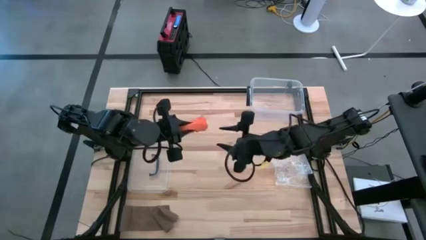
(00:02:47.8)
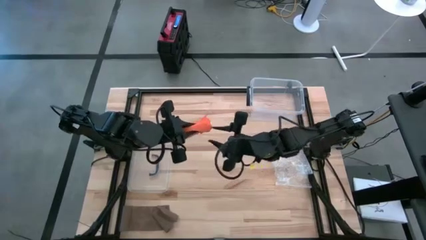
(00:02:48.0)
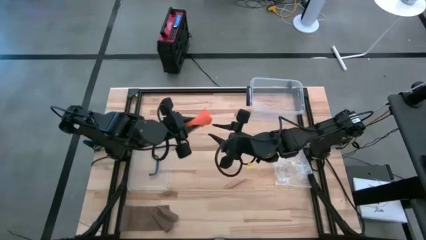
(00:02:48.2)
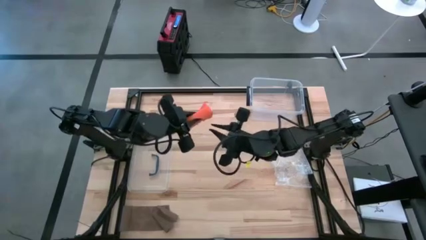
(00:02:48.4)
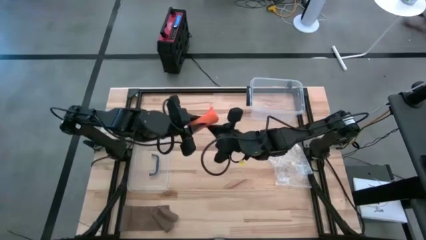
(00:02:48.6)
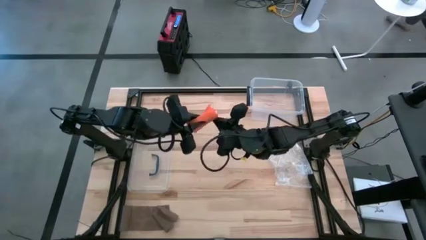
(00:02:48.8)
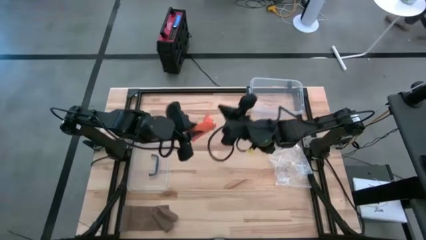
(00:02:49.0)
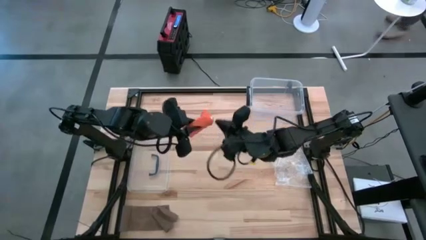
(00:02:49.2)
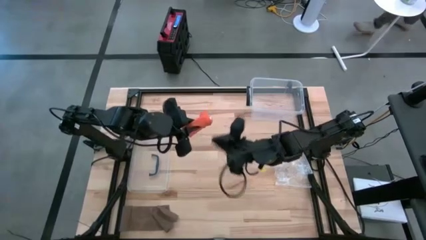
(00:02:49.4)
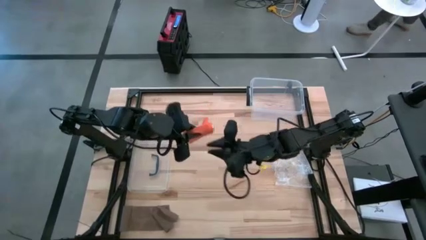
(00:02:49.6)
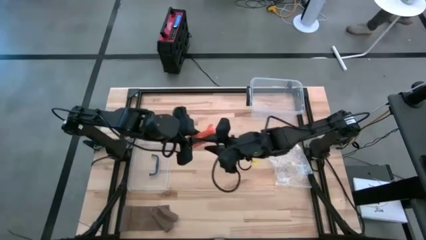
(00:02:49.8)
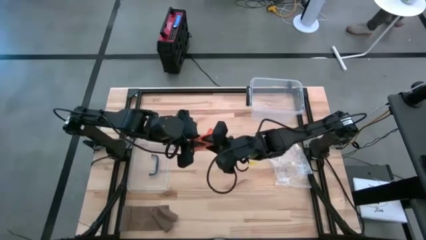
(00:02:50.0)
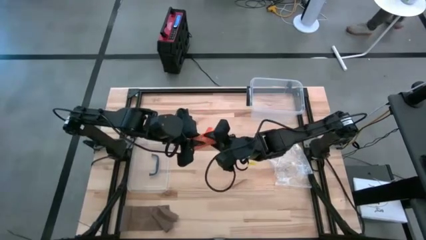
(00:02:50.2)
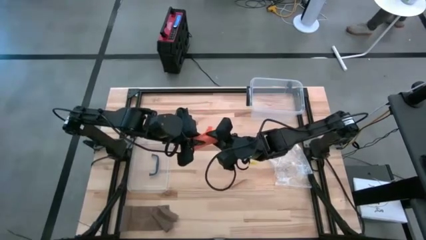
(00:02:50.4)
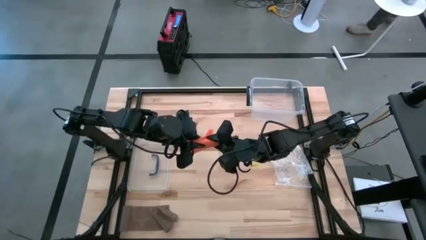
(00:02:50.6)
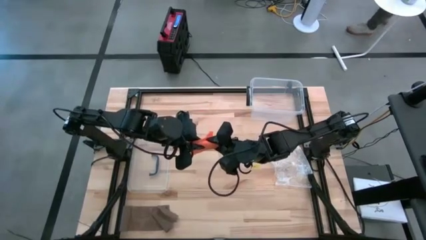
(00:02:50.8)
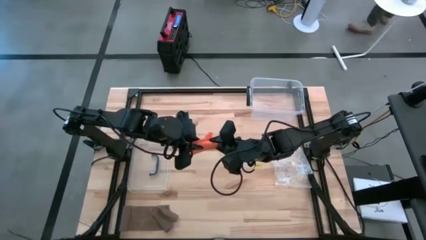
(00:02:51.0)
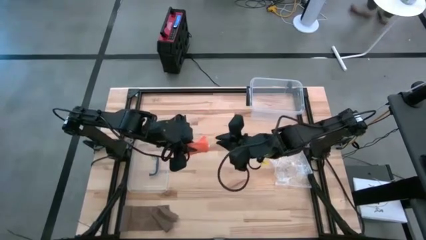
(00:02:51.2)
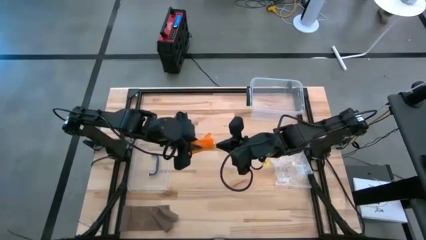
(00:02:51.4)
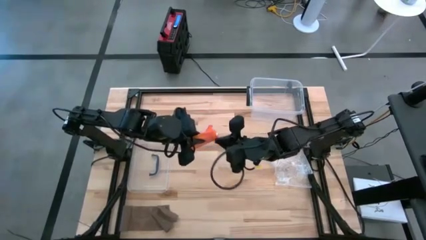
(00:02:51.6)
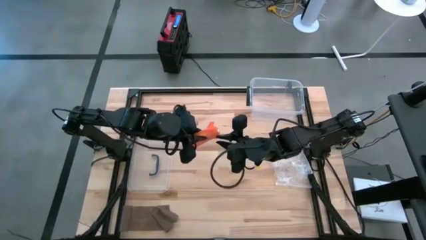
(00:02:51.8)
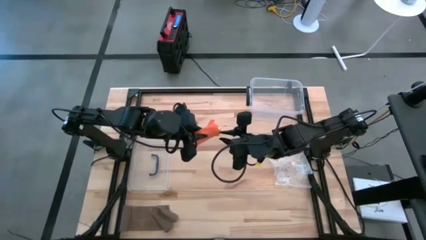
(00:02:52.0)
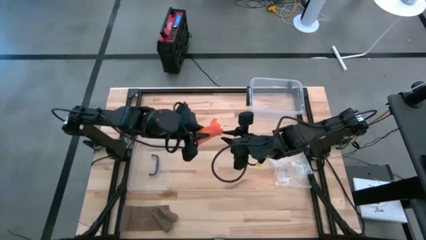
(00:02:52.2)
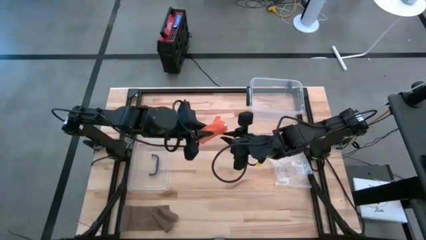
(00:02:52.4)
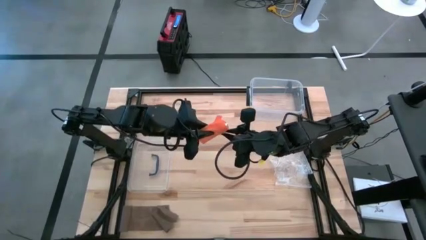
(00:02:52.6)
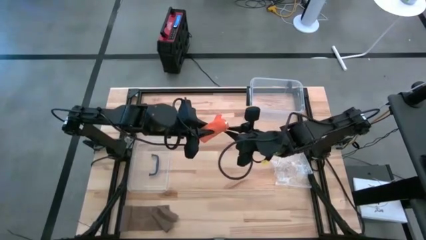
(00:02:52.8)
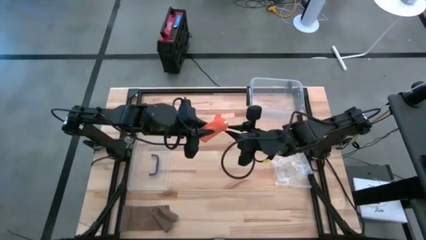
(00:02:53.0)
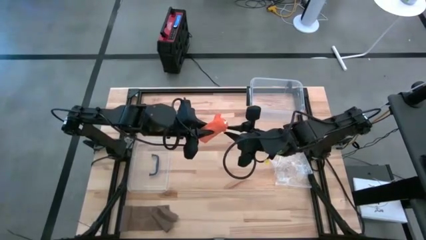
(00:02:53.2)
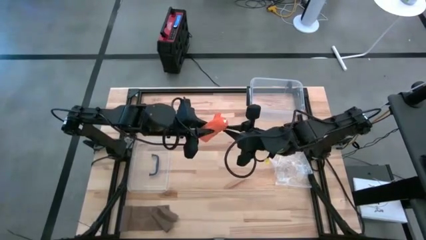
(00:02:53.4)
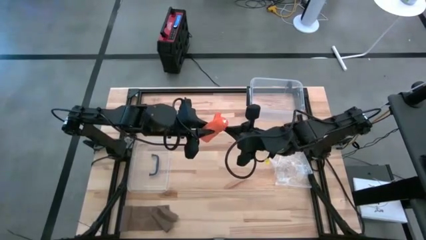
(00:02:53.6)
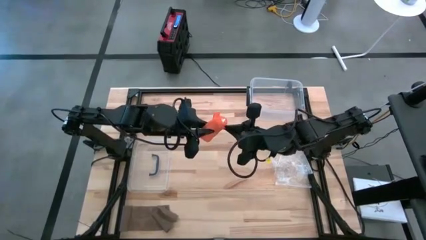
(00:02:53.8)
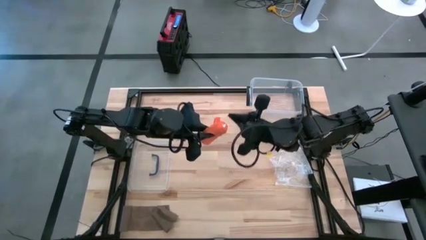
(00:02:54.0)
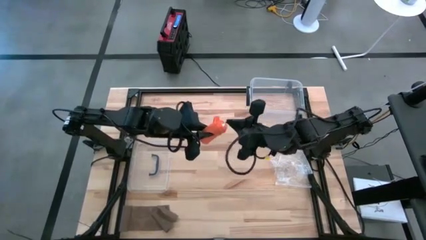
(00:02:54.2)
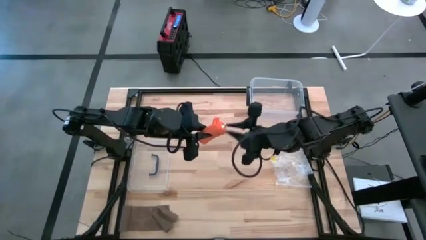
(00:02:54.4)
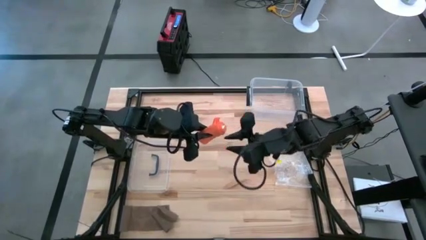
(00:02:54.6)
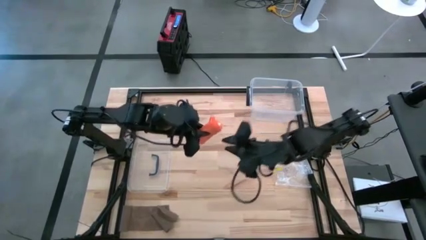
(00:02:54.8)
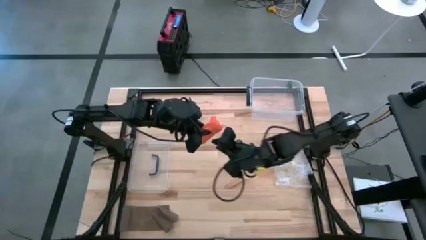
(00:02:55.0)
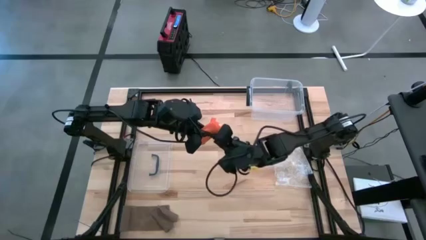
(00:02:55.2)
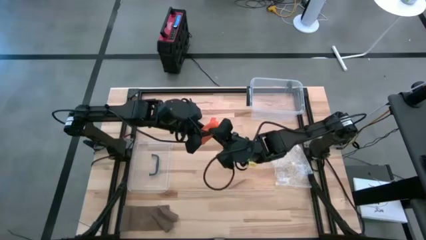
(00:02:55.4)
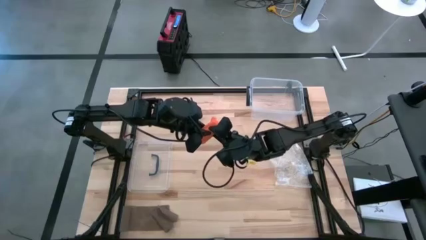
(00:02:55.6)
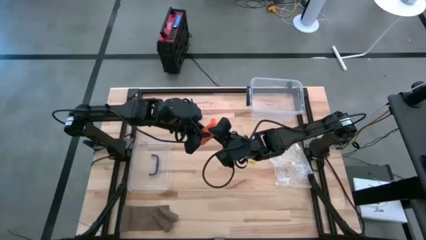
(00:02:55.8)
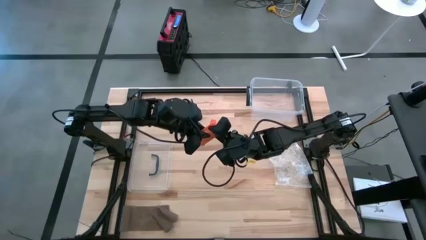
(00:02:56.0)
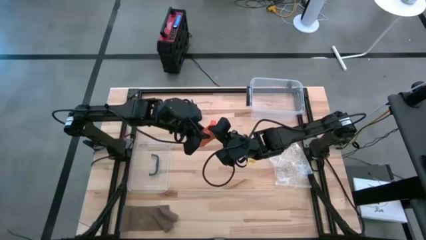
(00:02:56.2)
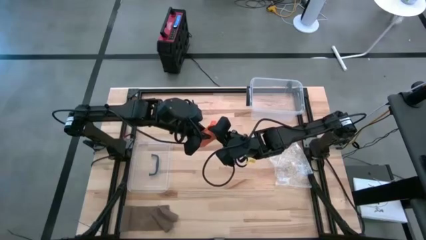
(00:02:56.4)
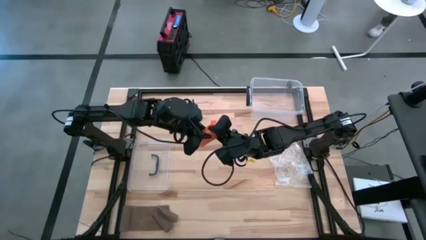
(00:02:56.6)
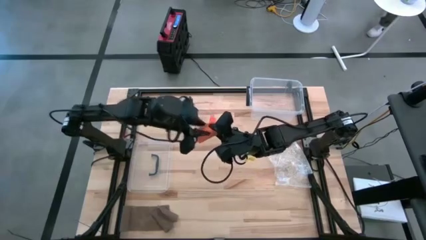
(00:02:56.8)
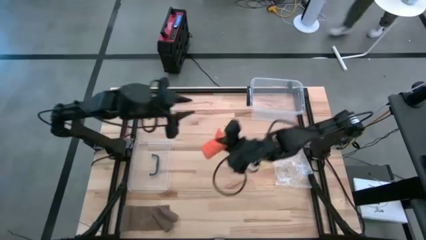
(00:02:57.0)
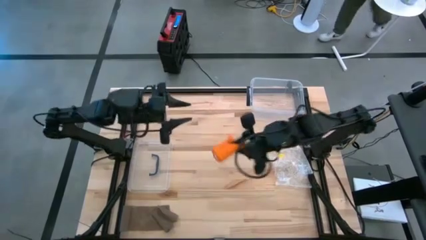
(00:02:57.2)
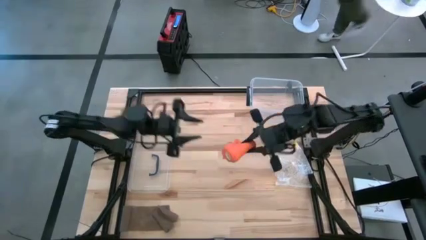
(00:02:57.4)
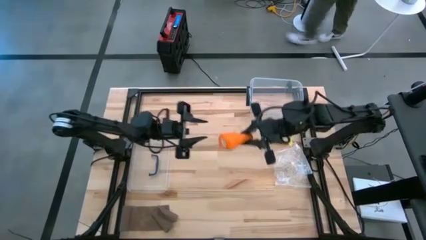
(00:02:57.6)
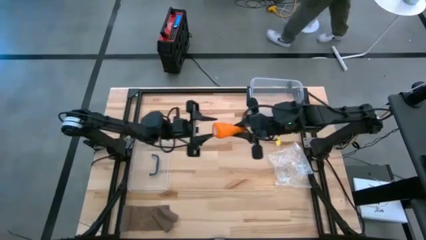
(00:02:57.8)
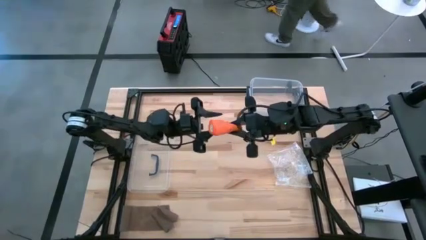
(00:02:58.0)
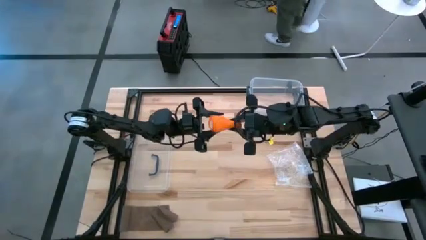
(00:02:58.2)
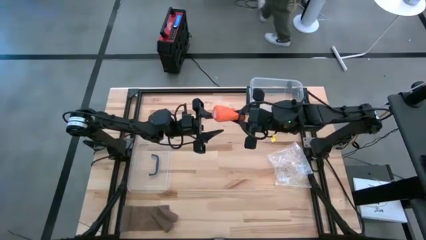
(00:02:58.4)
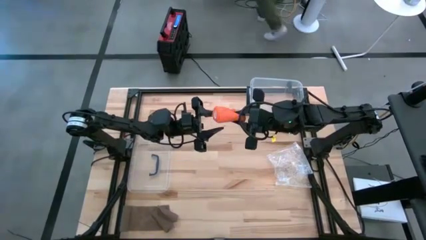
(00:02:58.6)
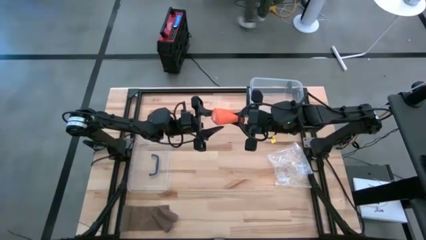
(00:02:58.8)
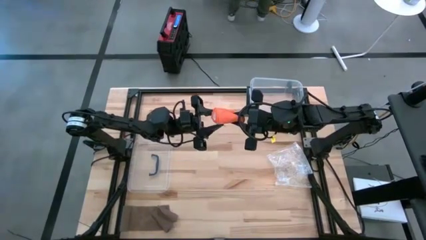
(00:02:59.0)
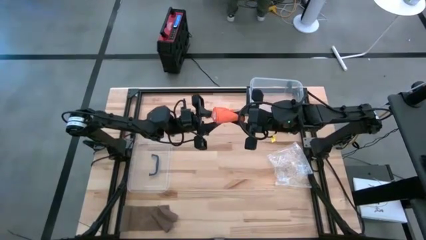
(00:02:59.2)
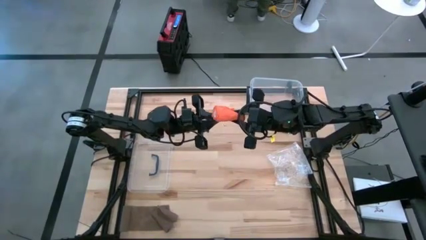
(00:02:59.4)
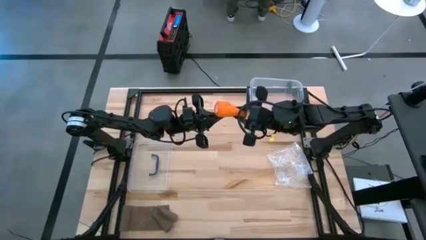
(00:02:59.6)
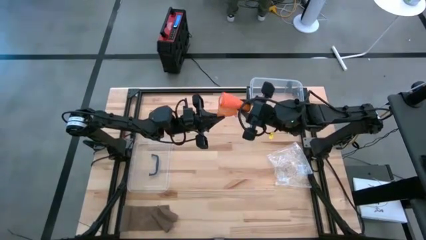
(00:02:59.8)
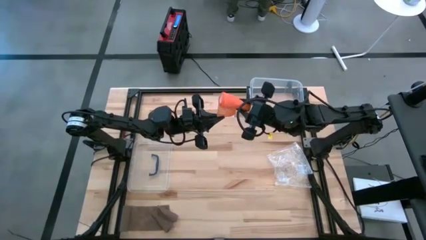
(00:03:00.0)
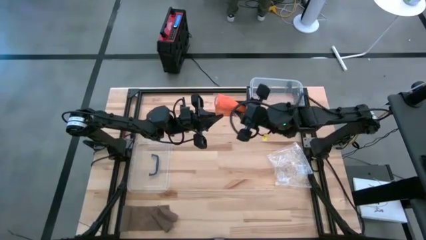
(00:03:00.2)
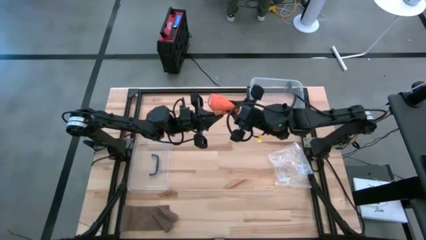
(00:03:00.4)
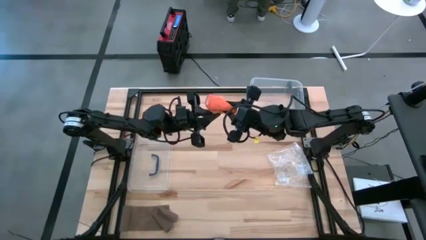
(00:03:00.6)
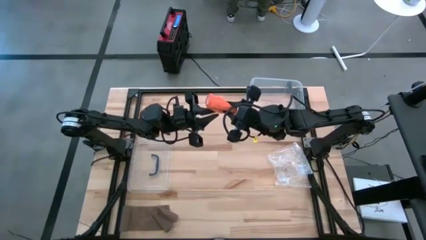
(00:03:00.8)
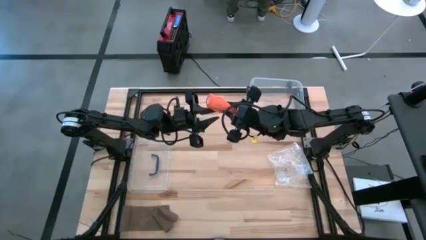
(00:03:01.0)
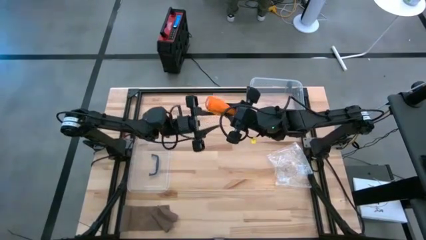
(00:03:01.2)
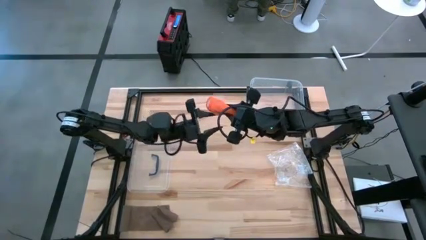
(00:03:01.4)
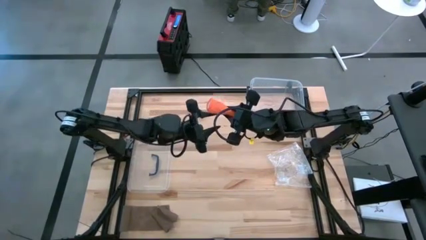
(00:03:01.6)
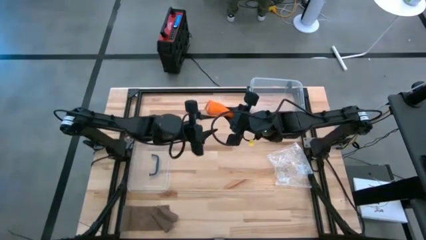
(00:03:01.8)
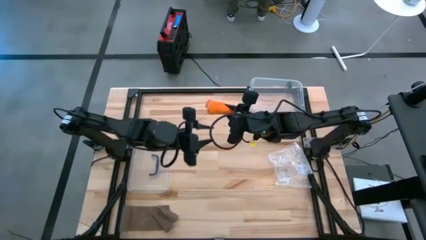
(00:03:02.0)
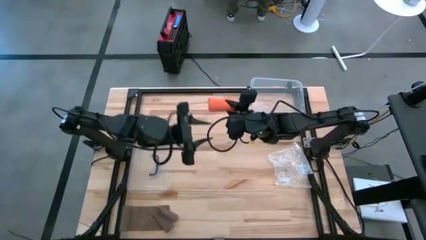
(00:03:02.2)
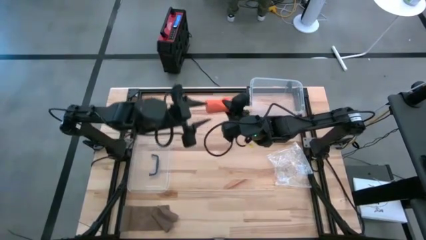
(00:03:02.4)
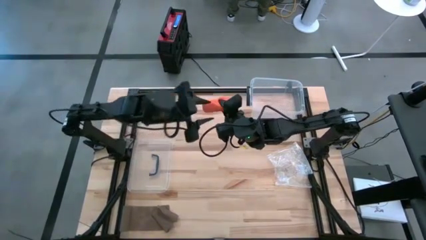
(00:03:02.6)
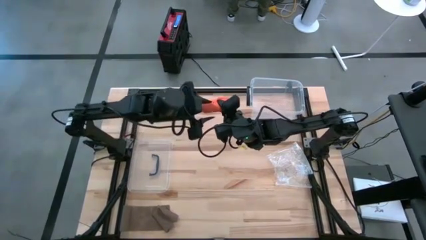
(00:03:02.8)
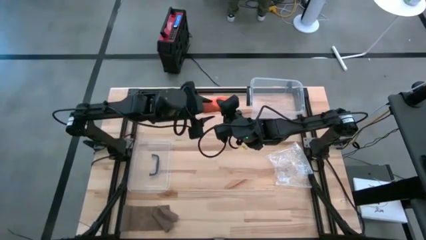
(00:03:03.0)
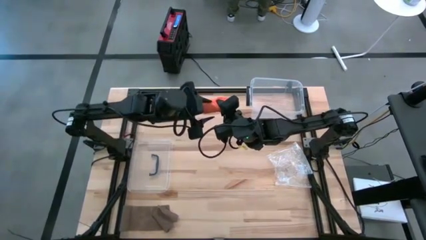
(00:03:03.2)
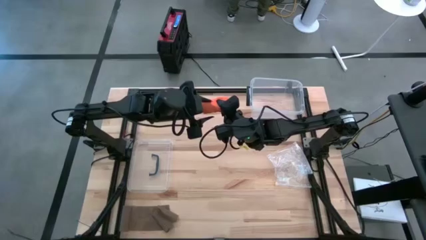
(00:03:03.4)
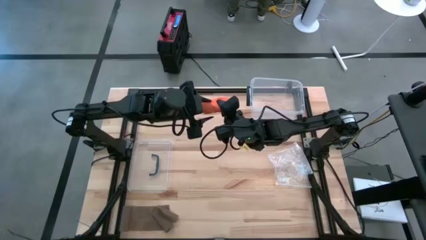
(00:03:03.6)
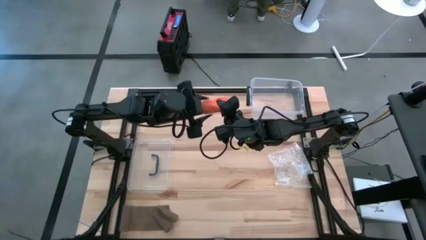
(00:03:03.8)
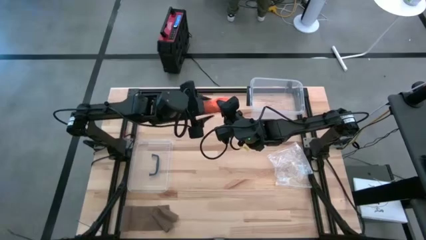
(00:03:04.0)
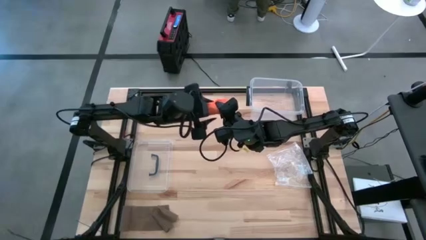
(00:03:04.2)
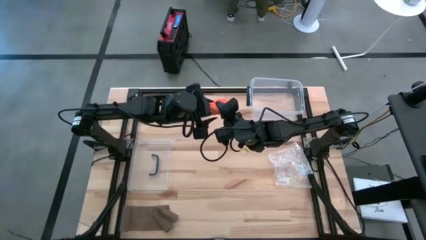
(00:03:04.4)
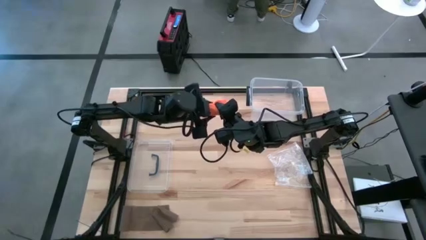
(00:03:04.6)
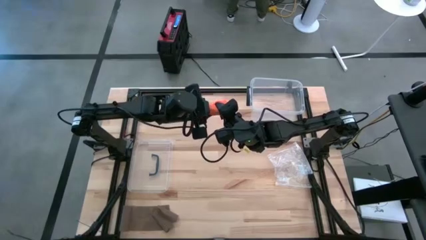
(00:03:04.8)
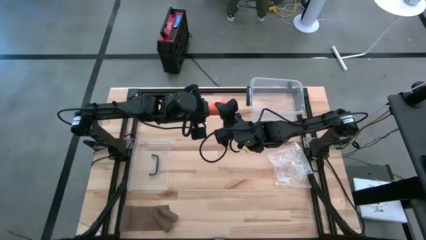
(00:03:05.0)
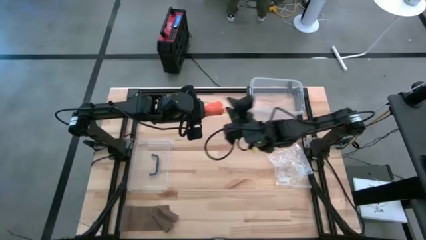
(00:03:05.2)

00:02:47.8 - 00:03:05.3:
Task: Roll bandage
Roll the orange bandage
